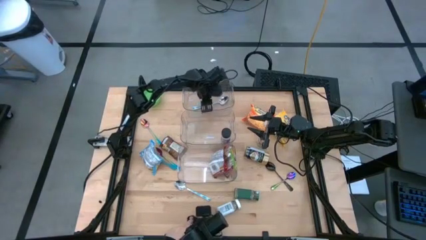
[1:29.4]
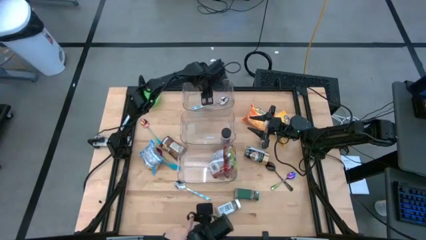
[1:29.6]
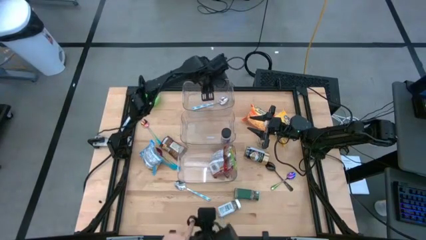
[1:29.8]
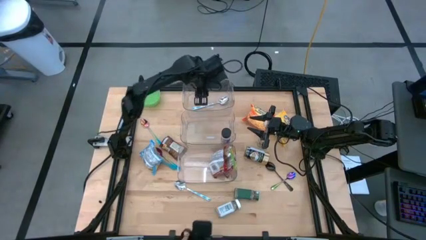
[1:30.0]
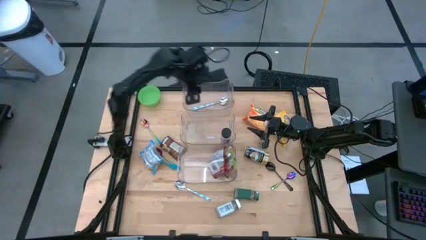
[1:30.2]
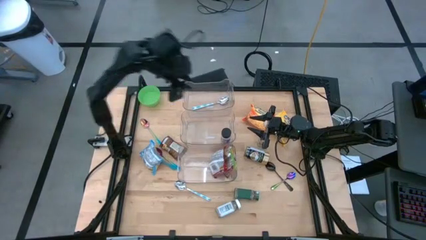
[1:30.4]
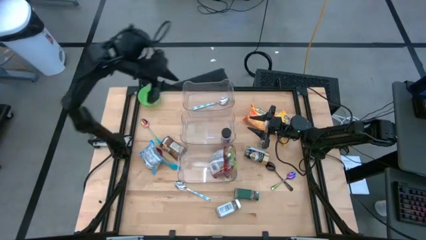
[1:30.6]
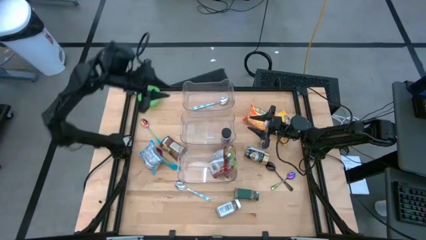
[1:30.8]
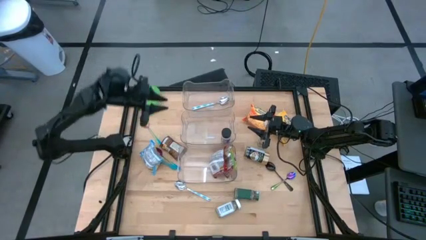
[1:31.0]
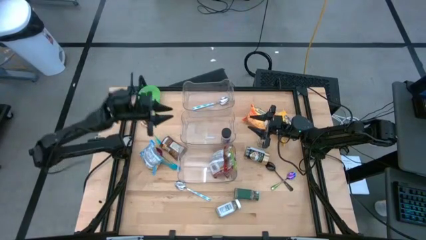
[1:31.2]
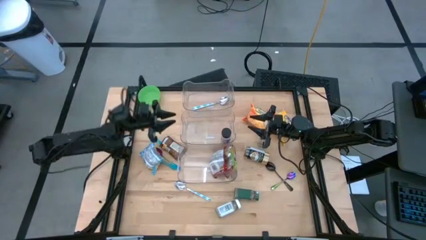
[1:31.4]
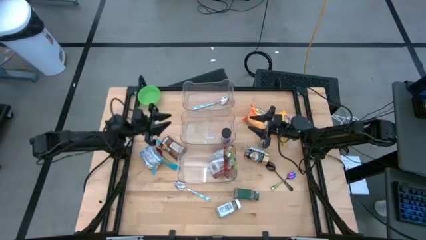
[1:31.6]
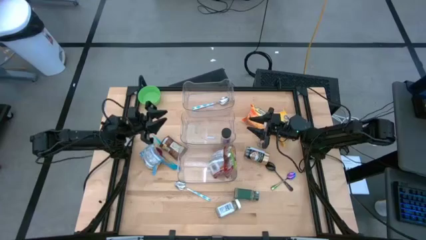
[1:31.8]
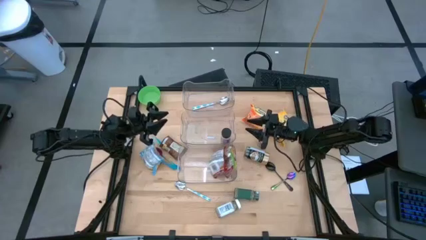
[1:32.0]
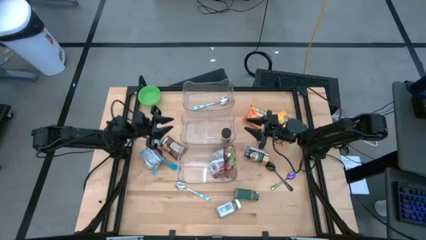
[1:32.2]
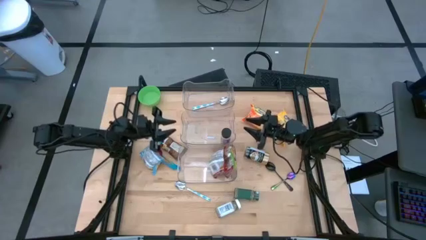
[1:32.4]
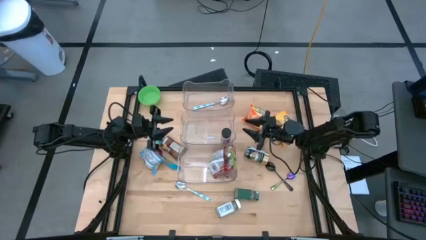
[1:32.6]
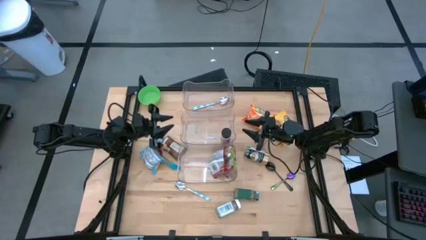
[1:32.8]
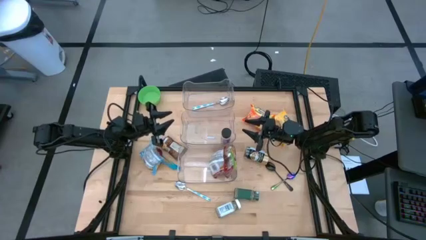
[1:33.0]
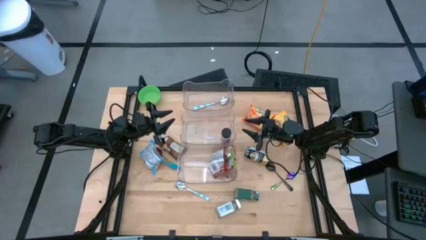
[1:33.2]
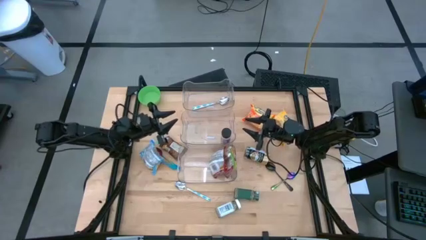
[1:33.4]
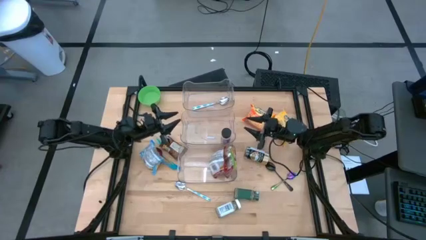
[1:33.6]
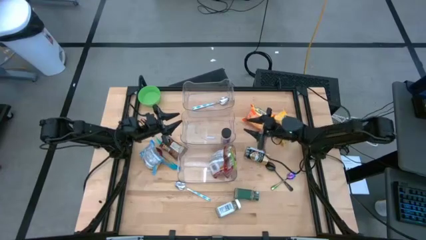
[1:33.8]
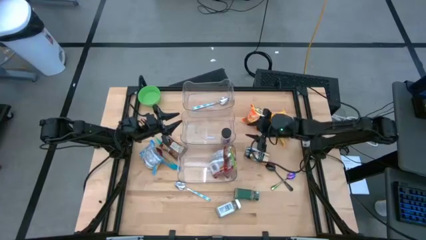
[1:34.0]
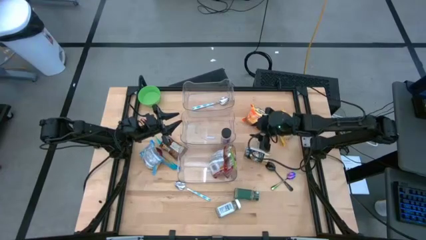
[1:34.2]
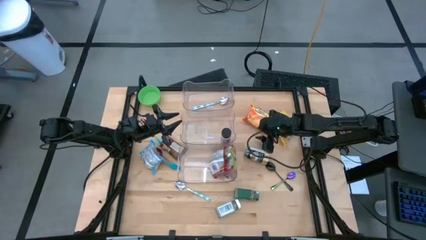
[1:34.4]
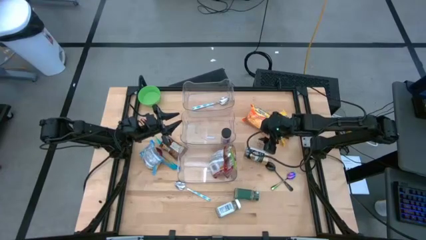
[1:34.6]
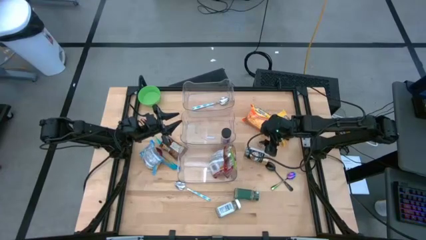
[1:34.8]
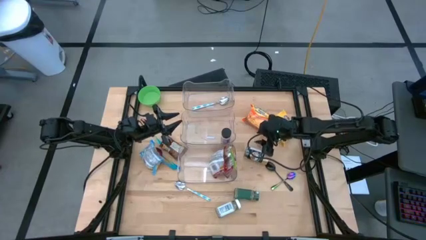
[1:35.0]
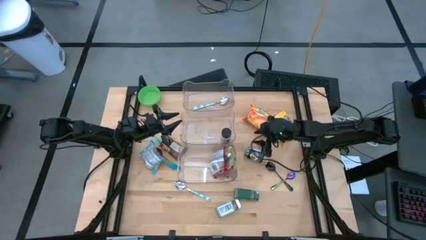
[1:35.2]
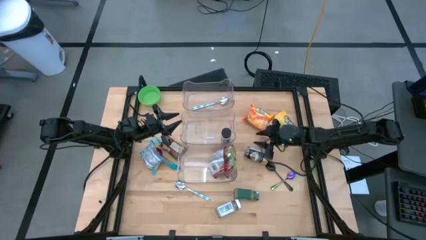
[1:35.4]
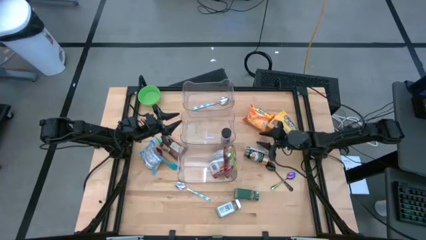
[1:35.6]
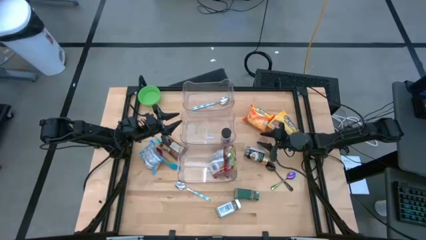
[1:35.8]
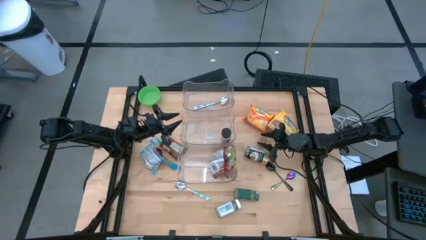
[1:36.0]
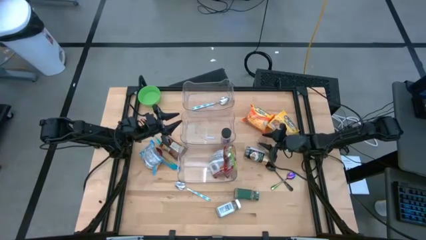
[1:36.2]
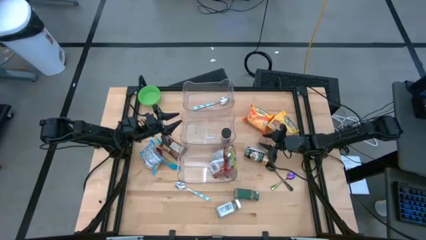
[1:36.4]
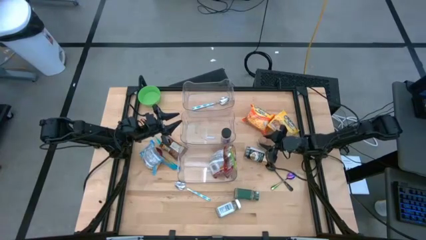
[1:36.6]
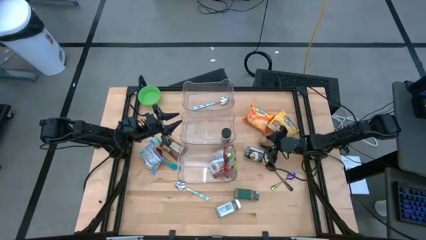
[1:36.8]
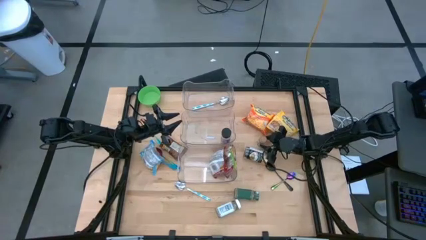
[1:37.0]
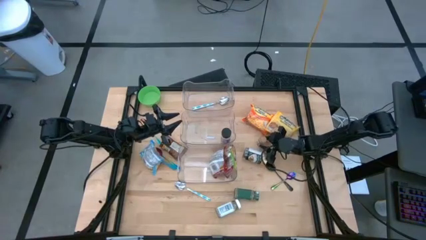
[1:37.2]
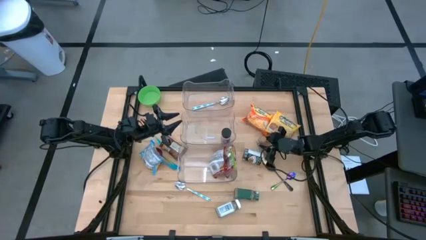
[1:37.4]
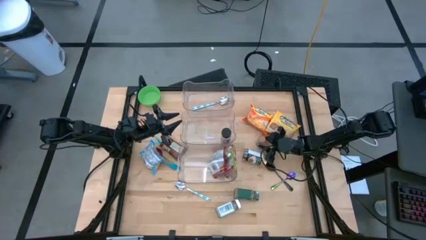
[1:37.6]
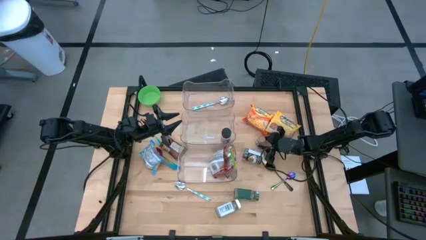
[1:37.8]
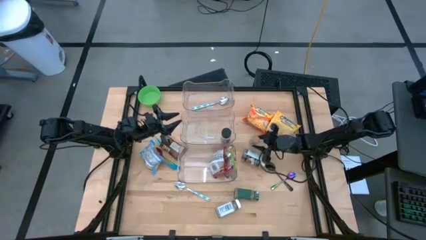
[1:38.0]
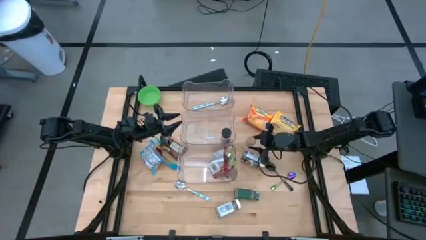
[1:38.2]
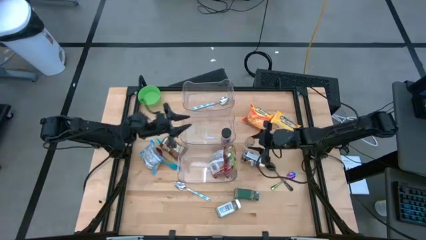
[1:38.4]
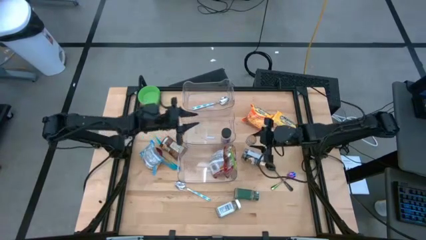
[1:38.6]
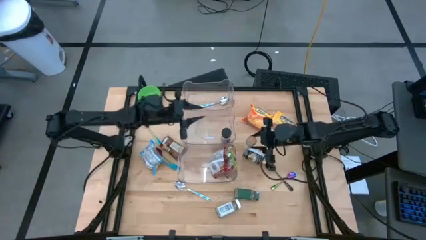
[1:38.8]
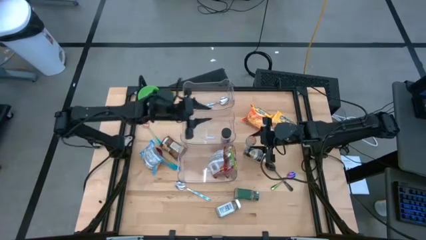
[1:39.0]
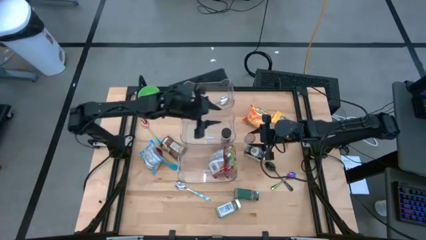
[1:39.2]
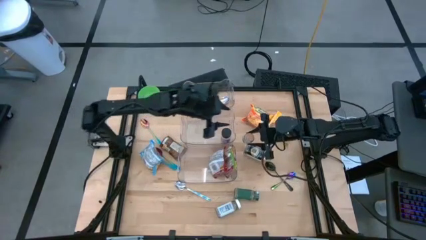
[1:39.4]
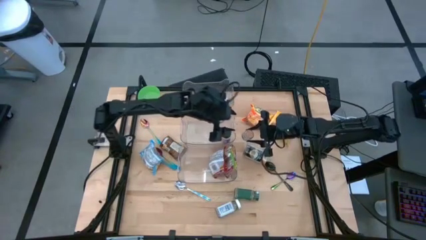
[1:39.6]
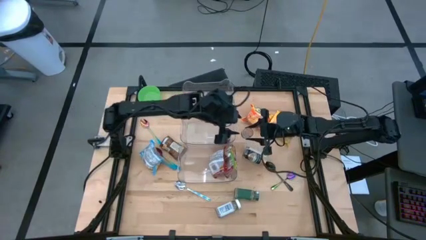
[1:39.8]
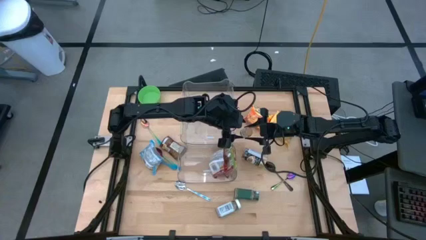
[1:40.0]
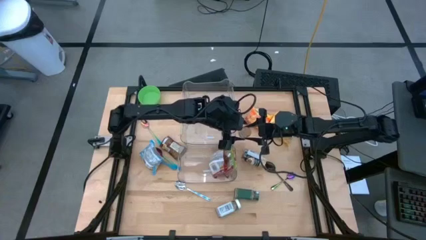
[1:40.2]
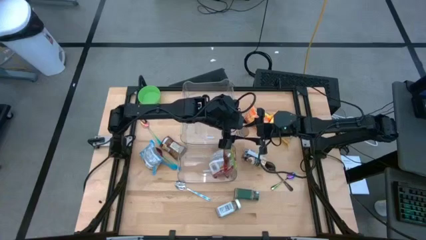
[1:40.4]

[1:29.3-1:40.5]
Task: Pick & Place Food Item
Put the brown seasoning bottle into the middle transparent bin

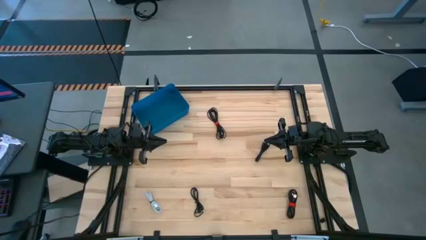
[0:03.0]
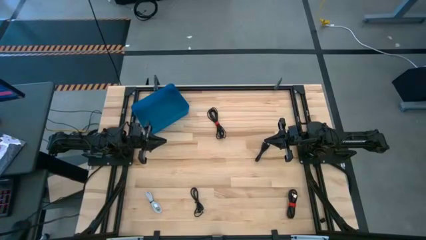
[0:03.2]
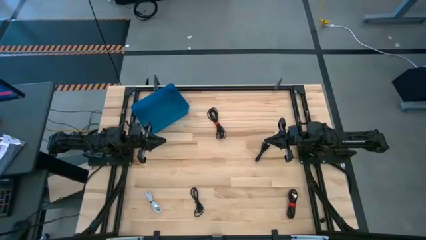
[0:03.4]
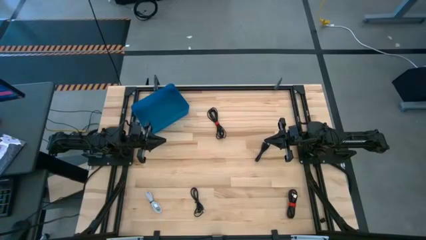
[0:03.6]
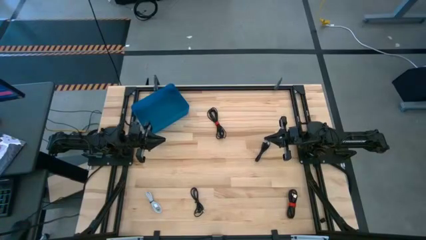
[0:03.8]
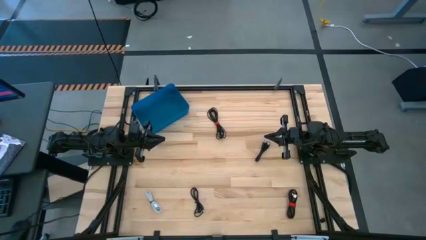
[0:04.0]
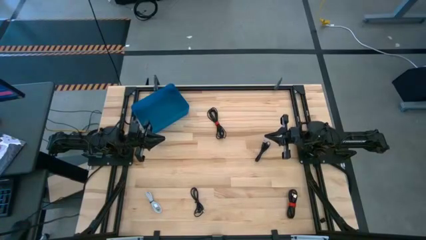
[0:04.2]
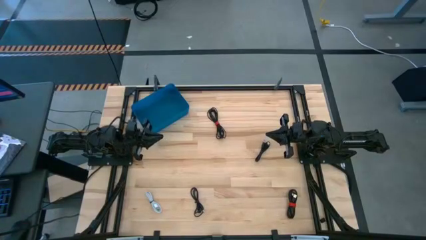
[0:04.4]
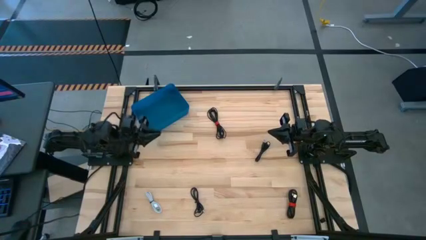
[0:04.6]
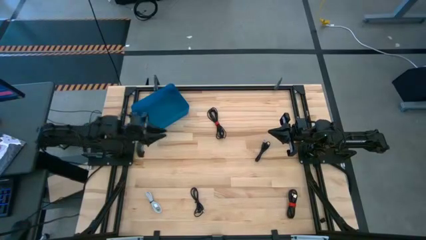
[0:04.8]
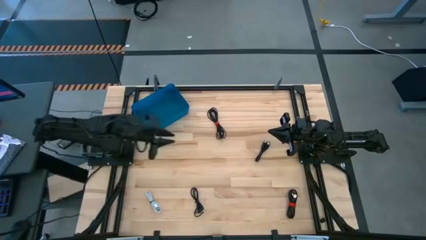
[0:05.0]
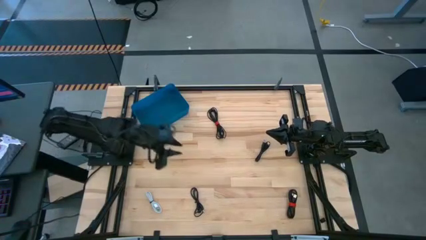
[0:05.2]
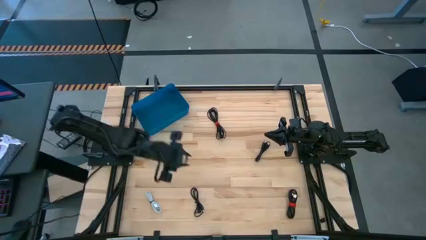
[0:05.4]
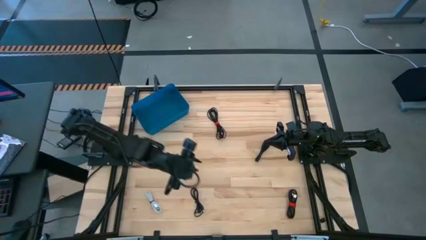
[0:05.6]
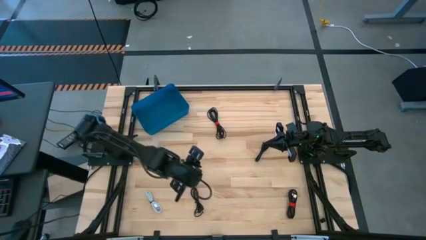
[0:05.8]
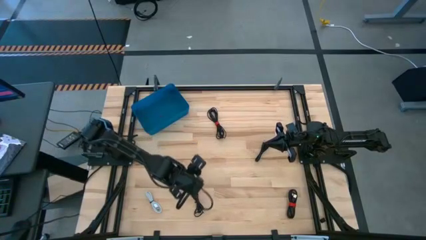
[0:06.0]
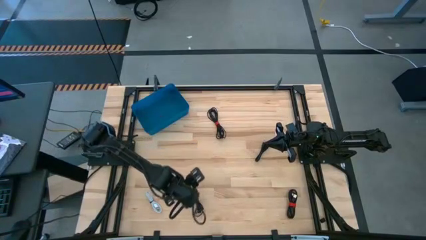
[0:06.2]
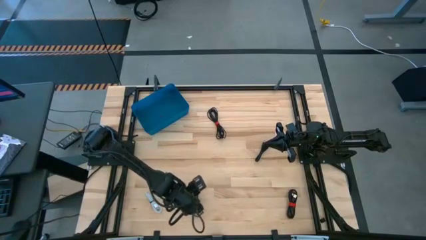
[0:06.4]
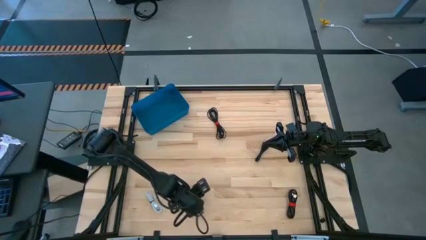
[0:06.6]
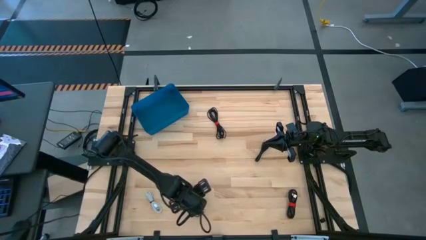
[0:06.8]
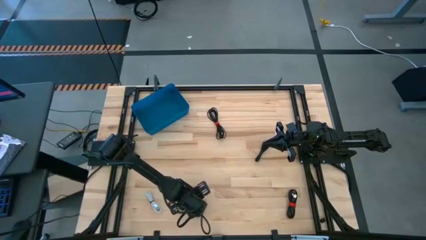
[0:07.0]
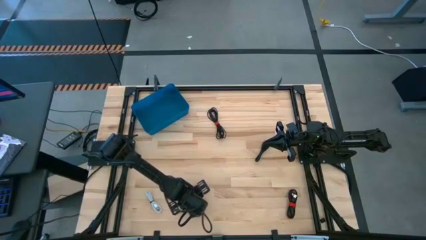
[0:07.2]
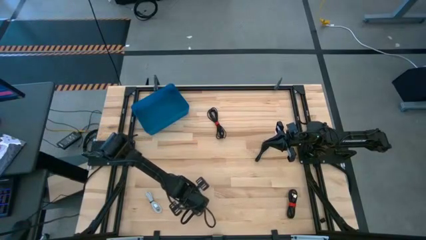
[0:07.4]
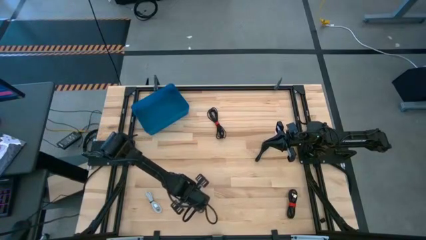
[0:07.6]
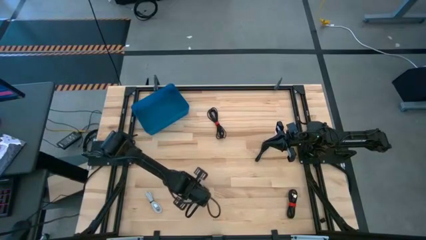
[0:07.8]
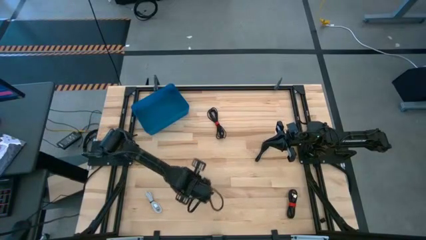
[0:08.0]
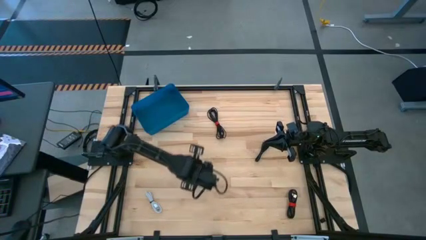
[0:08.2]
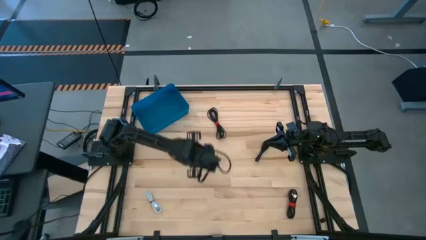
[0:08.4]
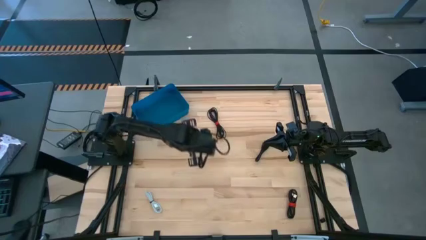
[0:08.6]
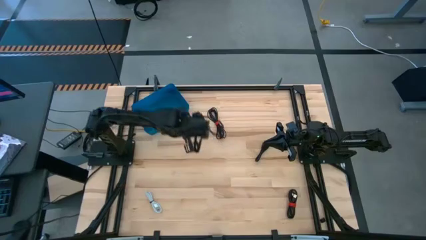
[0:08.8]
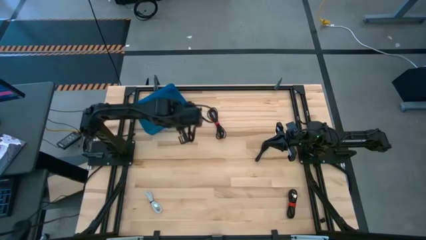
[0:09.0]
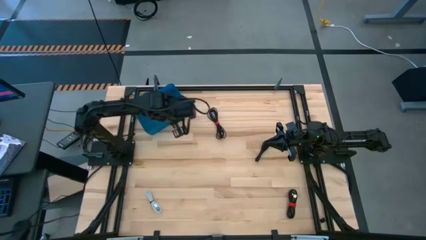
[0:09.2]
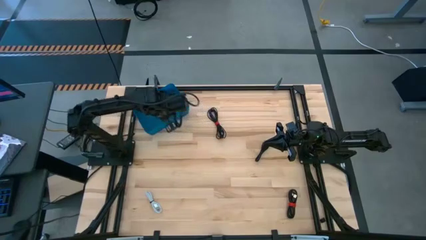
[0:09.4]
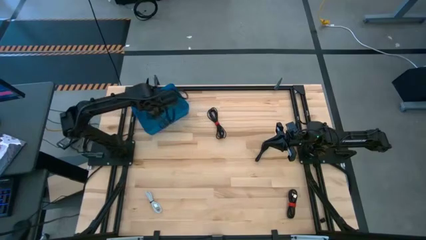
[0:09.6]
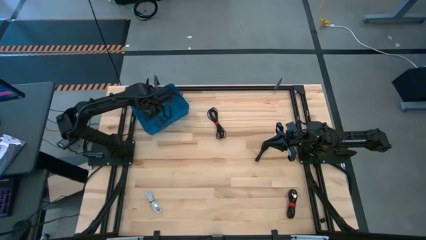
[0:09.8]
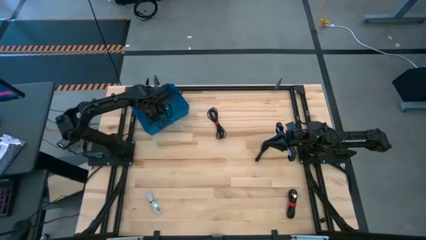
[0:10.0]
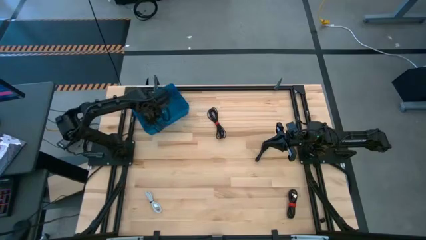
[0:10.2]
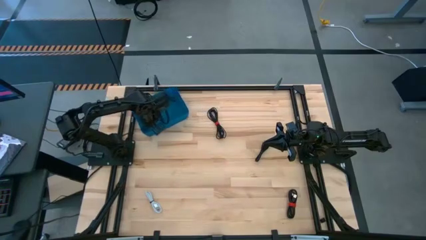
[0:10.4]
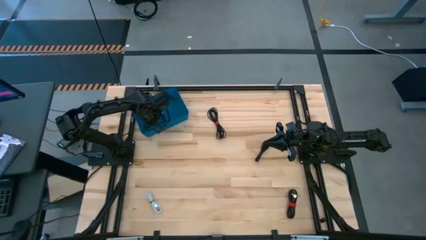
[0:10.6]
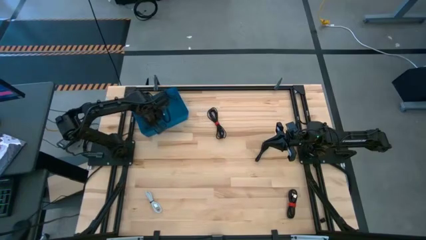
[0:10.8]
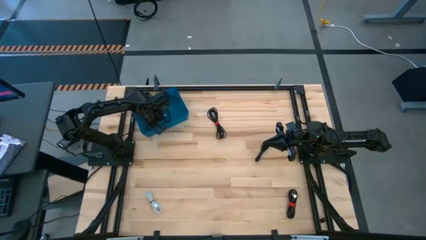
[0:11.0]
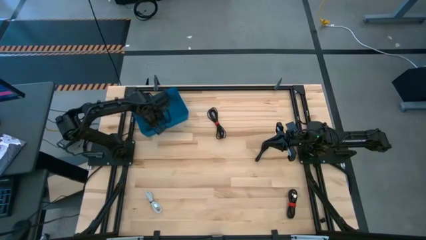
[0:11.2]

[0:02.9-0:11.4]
Task: Pick and place USB-C Cables
Put the black charger cable into the blue bin
